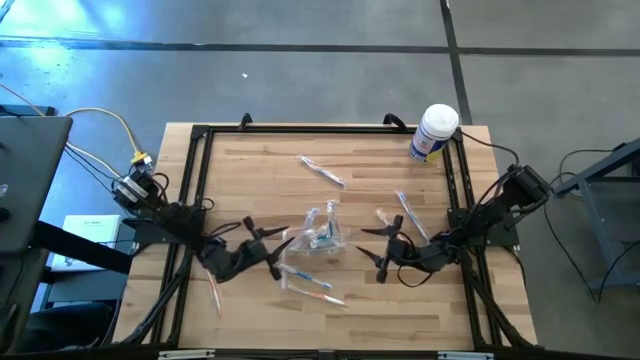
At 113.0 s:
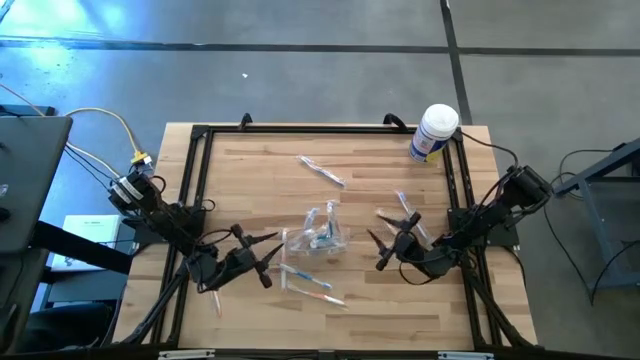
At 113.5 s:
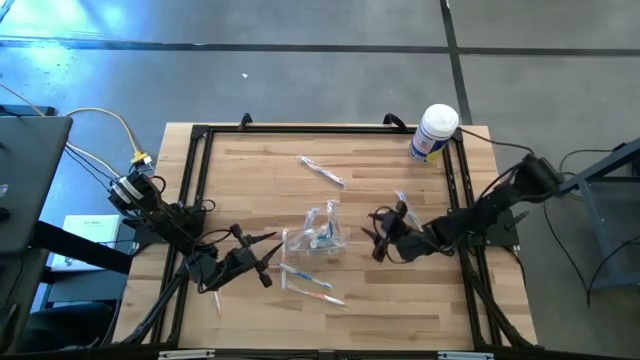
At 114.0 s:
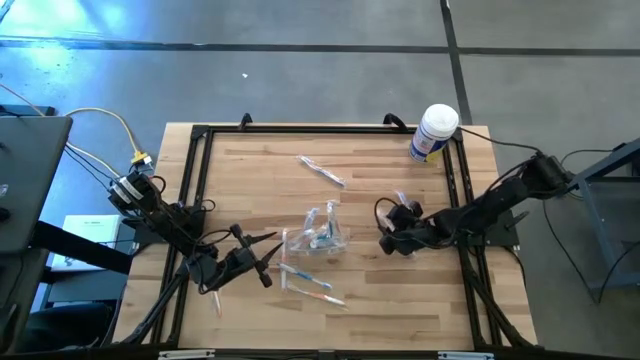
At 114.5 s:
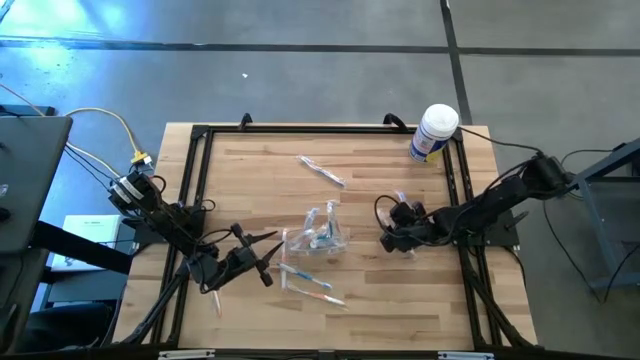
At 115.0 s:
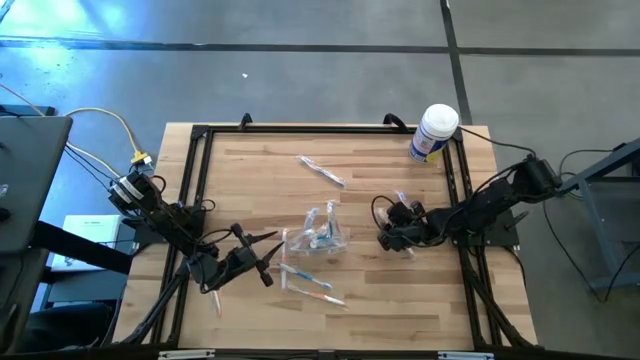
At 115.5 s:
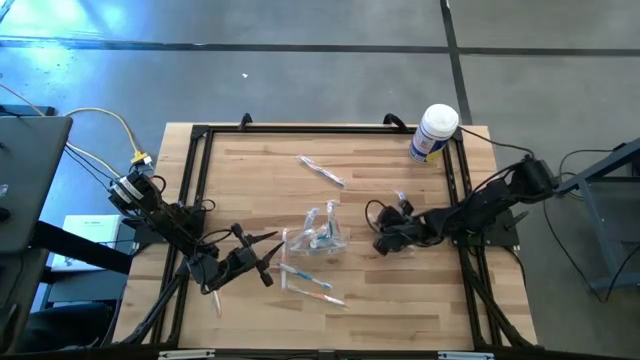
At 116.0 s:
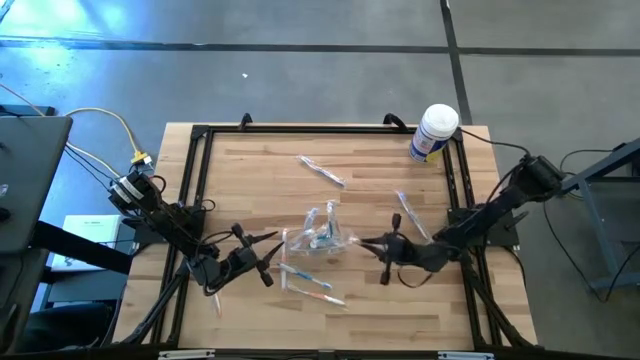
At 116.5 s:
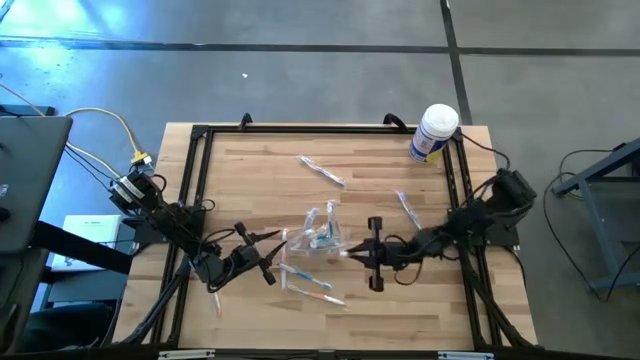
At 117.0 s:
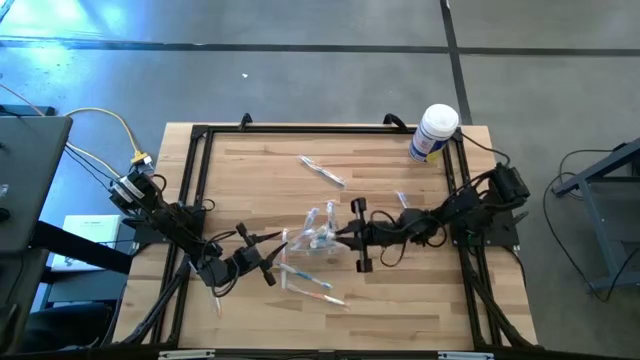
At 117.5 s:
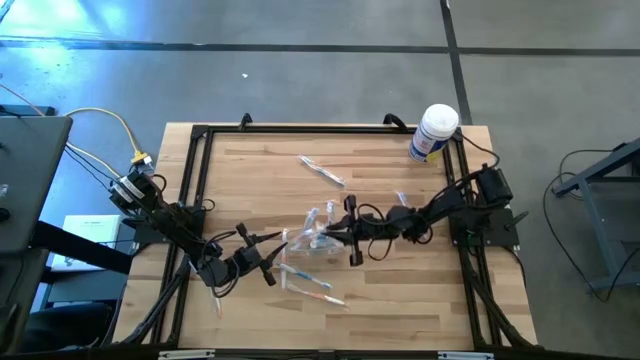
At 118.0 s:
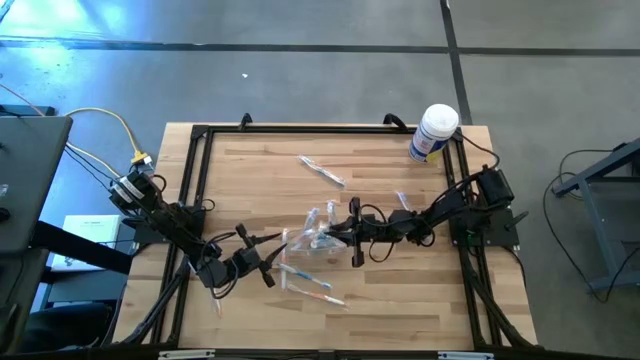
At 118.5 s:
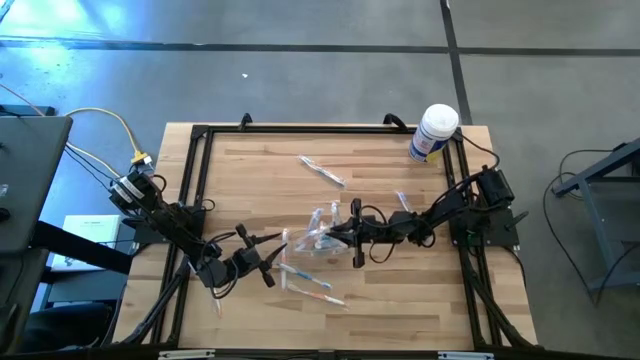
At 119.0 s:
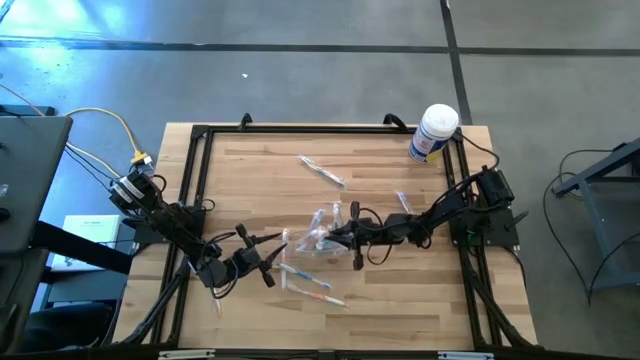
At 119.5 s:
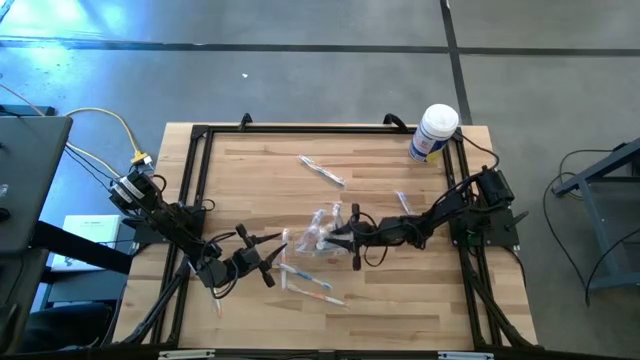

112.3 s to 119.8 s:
Task: Pick & Place toothbrushing station
Put the orange toothbrush into the transparent organizer

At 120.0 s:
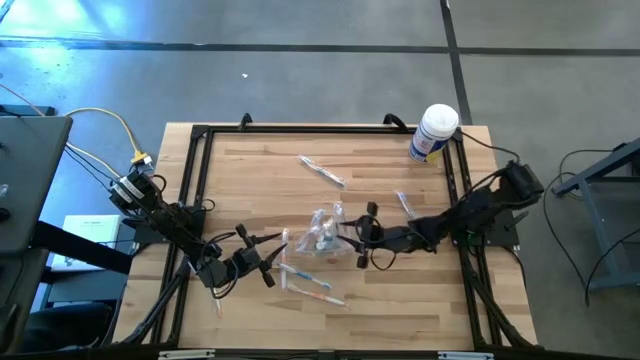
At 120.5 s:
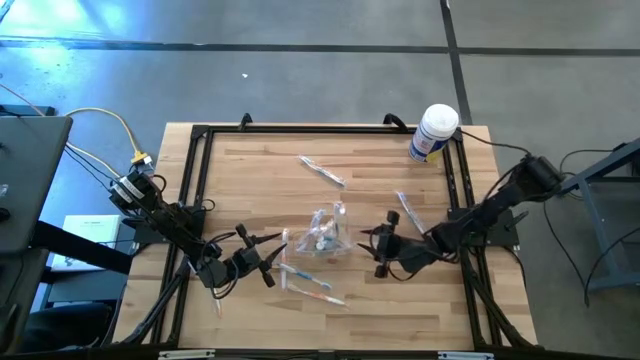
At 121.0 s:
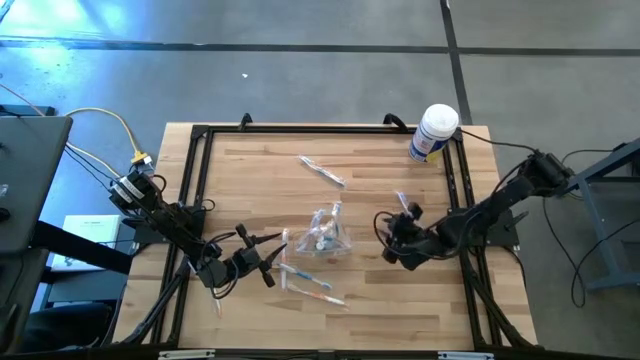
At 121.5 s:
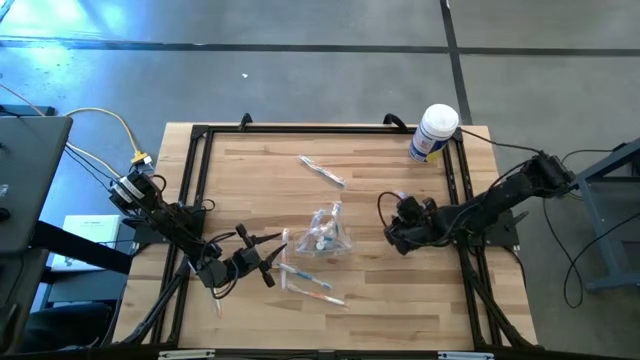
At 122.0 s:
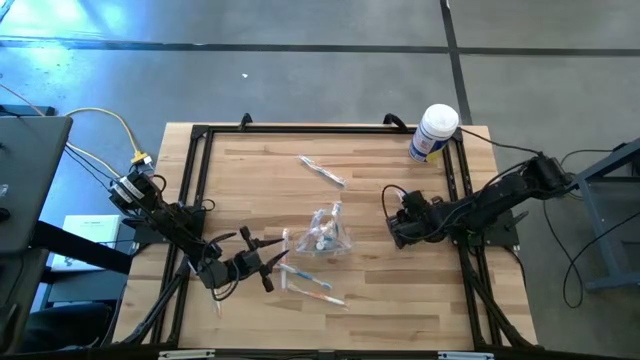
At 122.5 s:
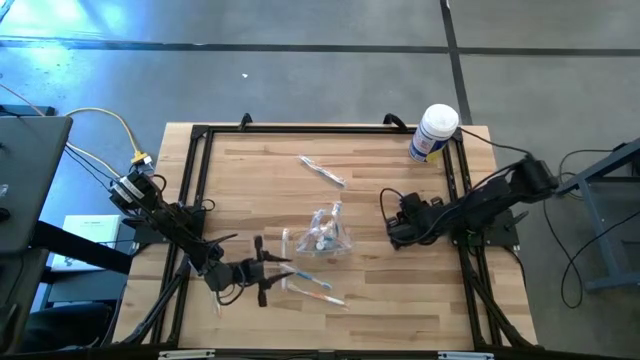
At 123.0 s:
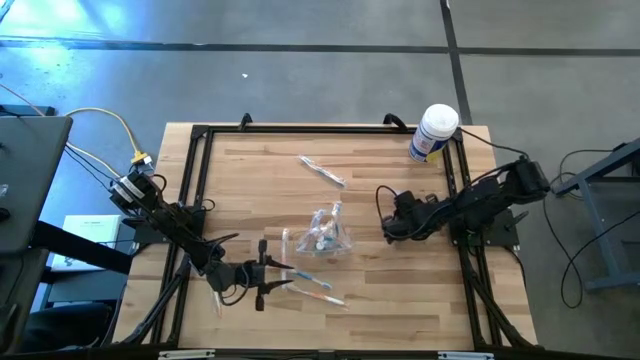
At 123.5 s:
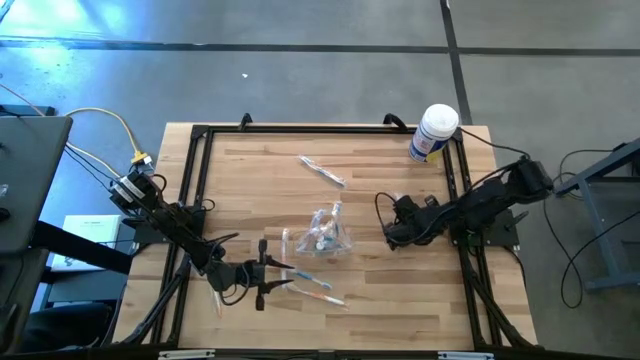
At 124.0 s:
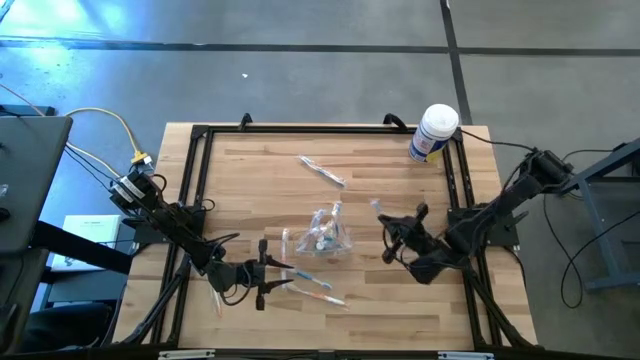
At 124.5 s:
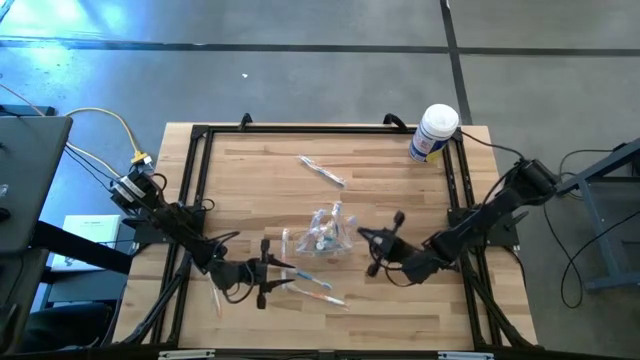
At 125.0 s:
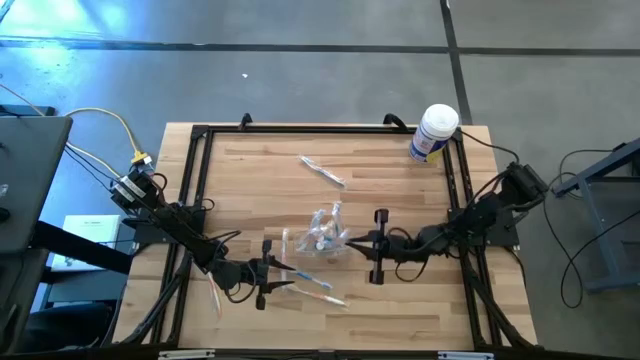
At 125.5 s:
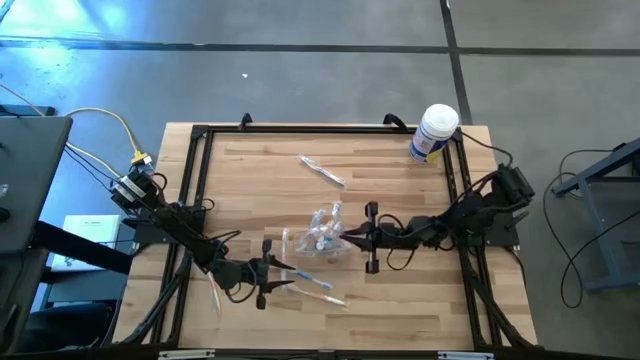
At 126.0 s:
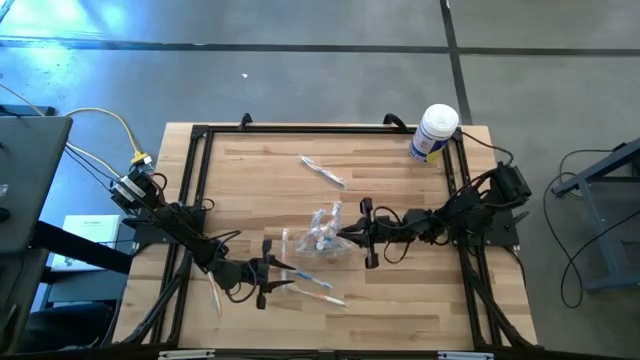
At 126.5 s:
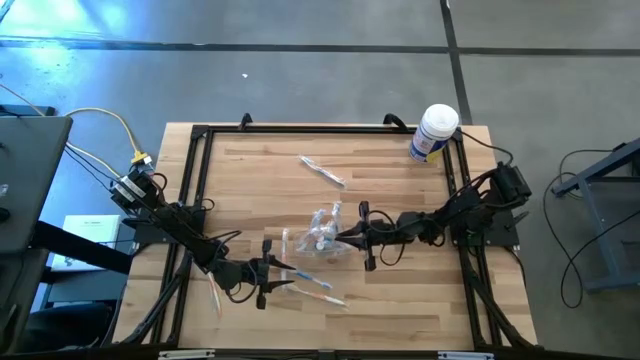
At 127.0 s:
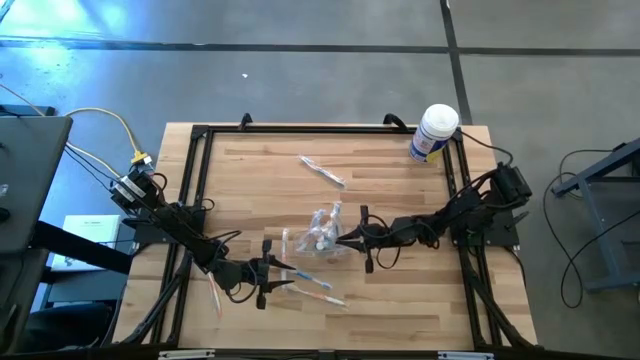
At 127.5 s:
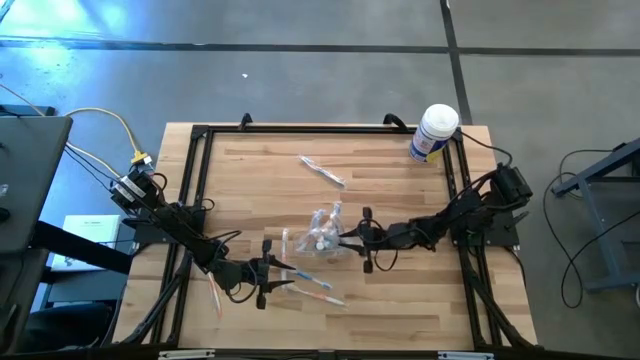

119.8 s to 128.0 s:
Put the blue toothbrush into the transparent organizer

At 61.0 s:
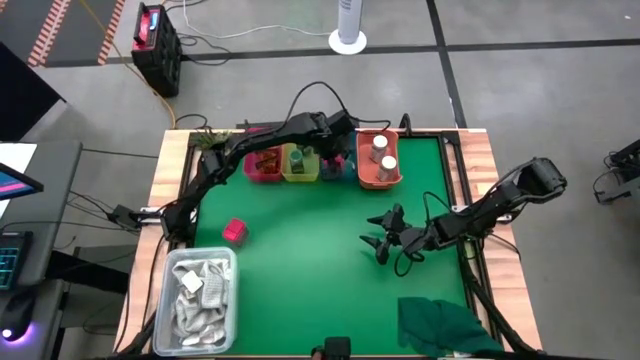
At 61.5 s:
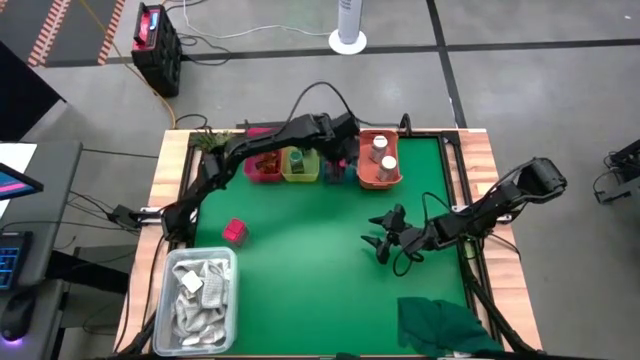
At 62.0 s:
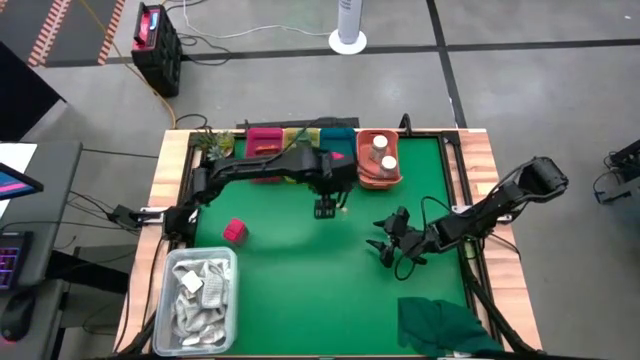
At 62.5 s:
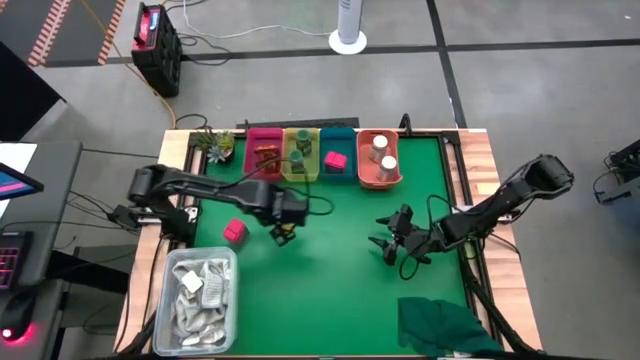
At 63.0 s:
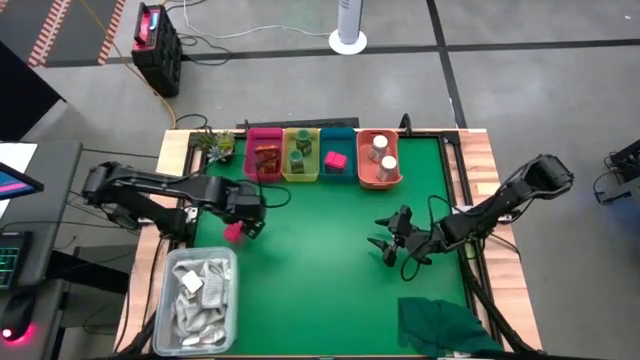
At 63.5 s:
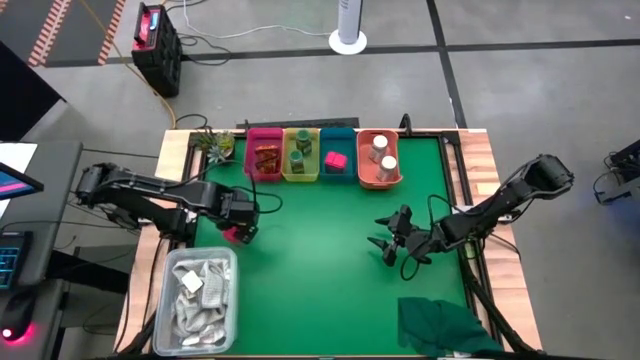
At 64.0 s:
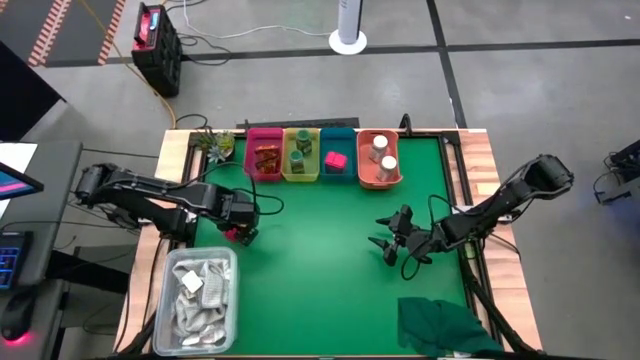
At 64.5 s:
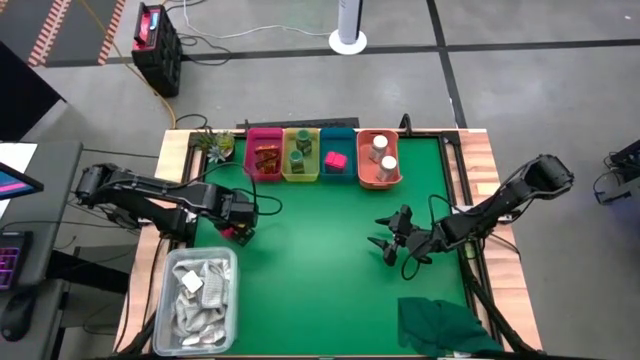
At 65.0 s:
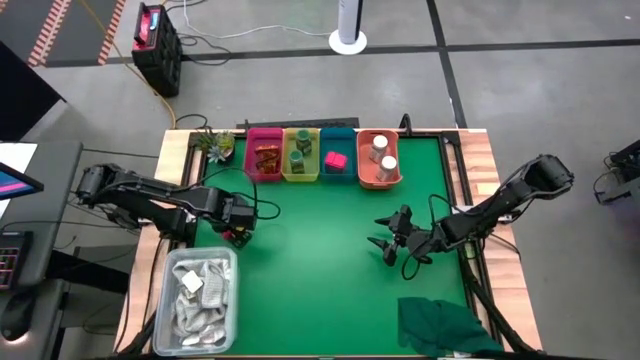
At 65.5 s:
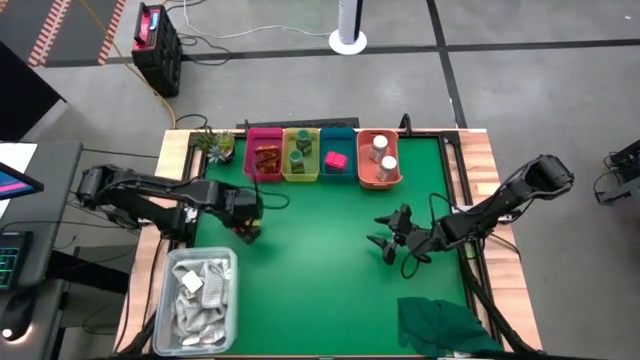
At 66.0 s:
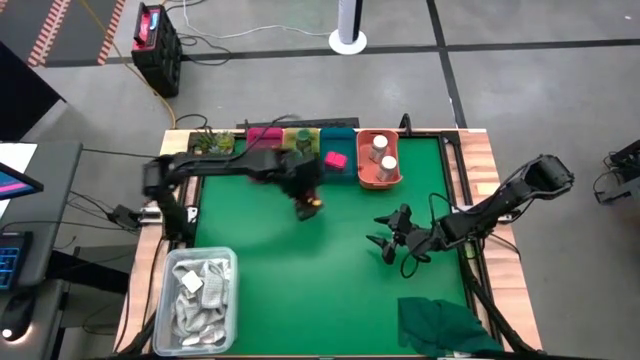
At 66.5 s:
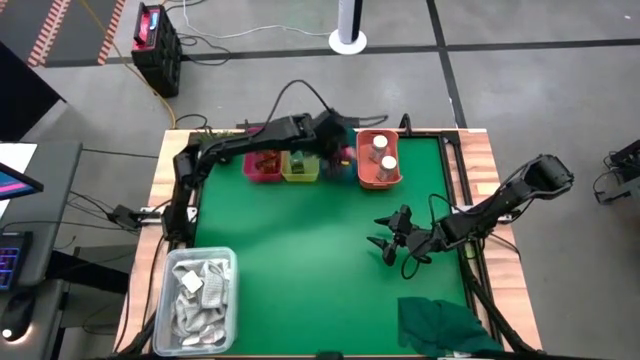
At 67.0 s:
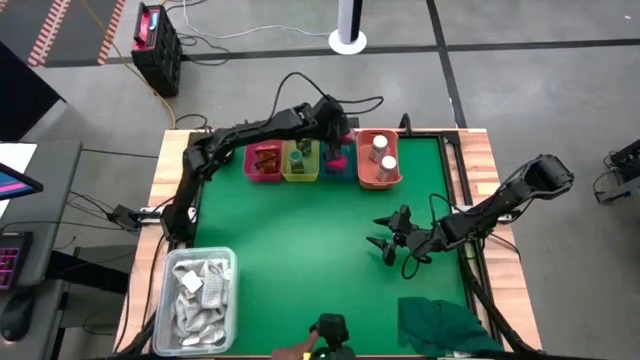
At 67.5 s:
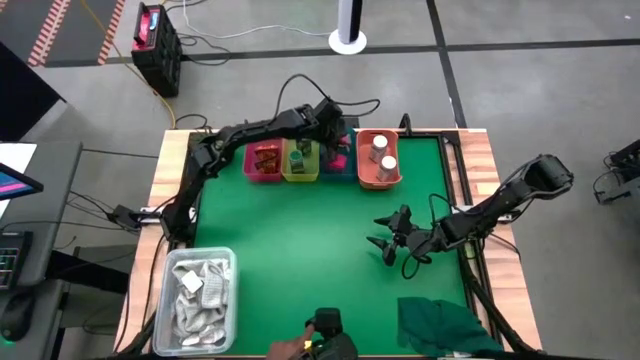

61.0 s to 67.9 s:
Task: Sort spices by type
Put the red lid seasoning can into the blue bin
